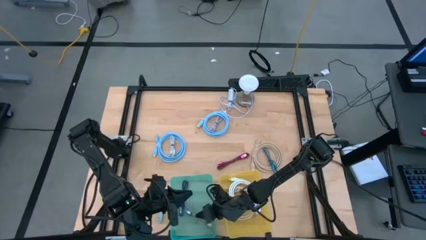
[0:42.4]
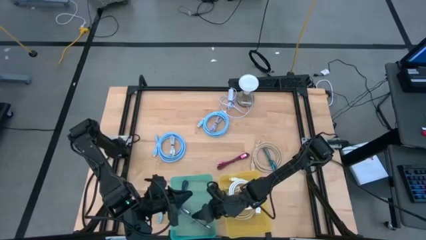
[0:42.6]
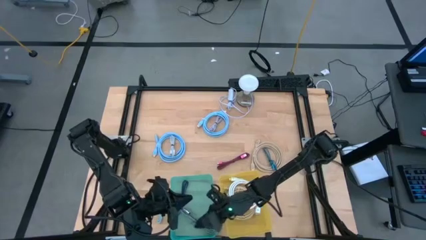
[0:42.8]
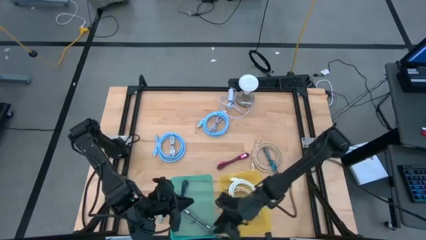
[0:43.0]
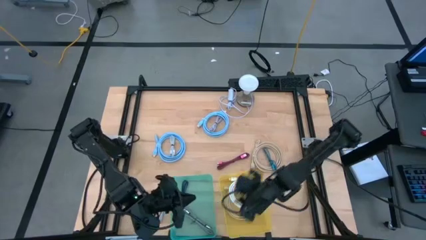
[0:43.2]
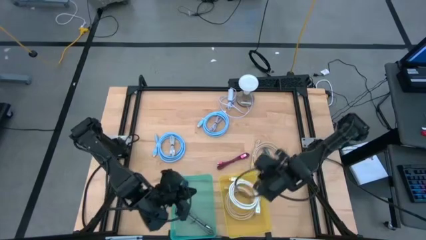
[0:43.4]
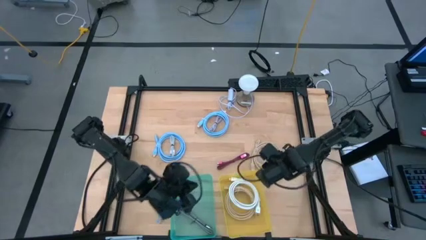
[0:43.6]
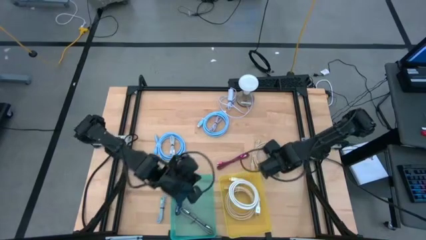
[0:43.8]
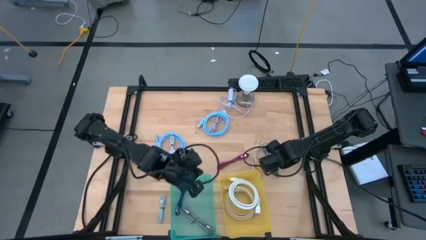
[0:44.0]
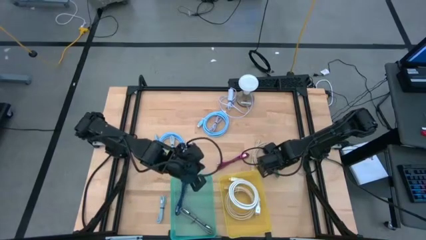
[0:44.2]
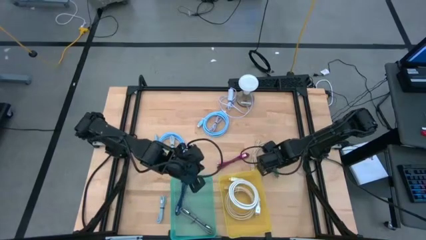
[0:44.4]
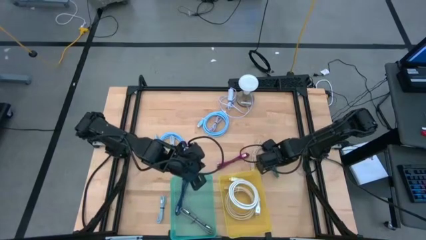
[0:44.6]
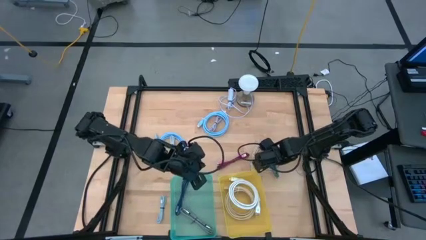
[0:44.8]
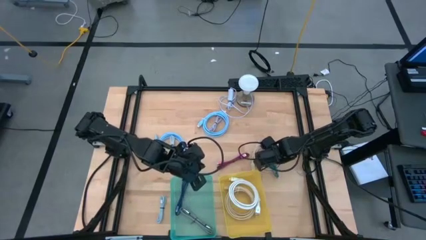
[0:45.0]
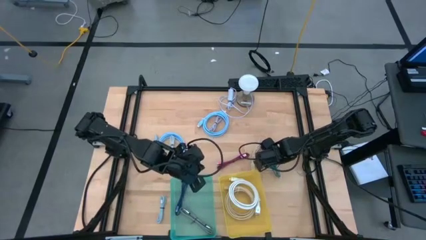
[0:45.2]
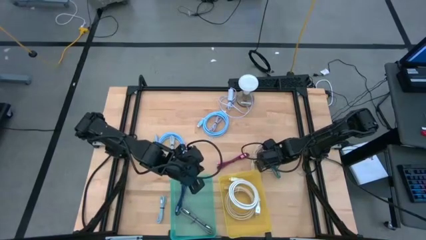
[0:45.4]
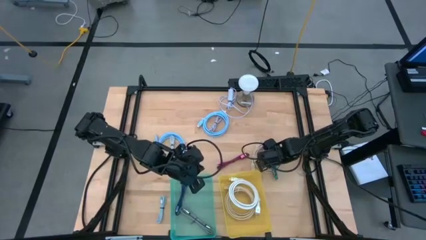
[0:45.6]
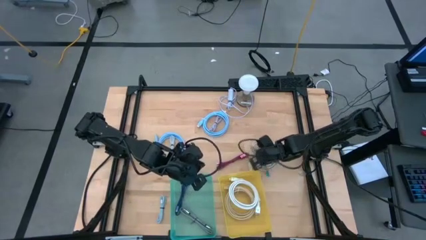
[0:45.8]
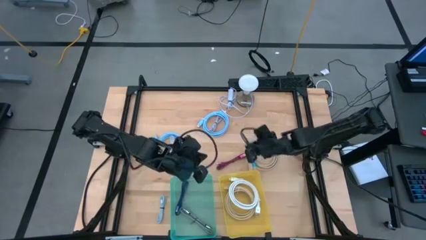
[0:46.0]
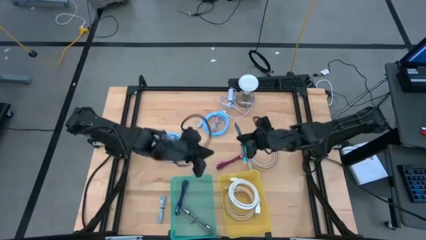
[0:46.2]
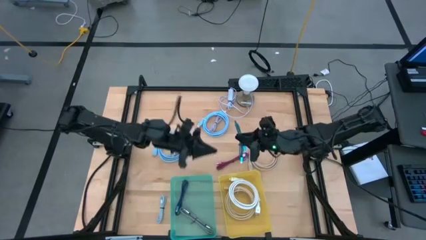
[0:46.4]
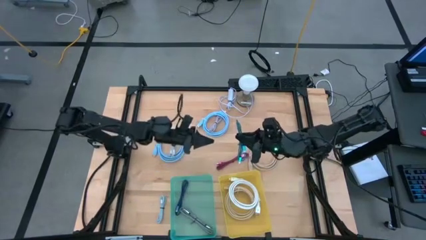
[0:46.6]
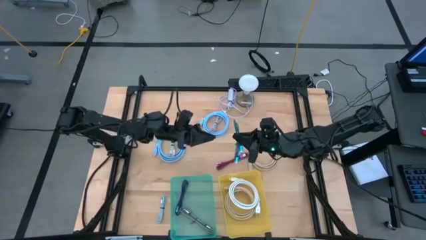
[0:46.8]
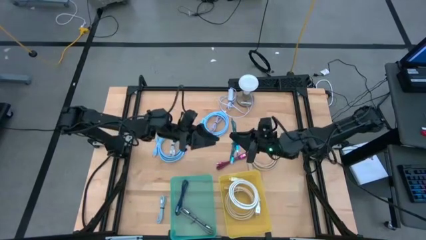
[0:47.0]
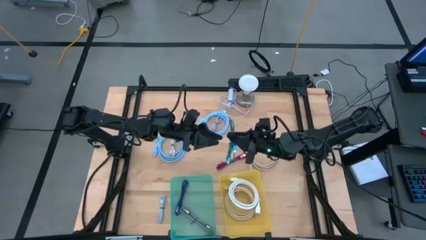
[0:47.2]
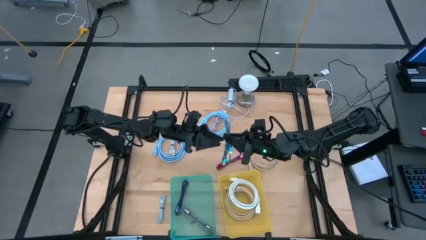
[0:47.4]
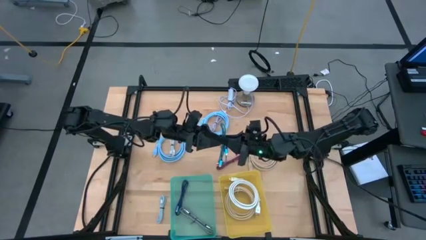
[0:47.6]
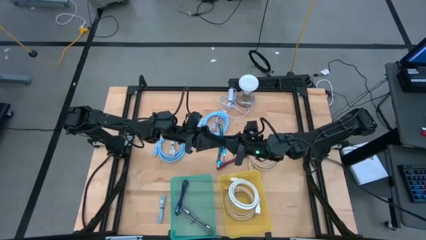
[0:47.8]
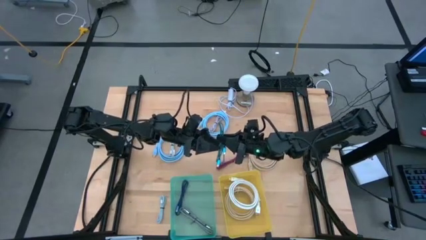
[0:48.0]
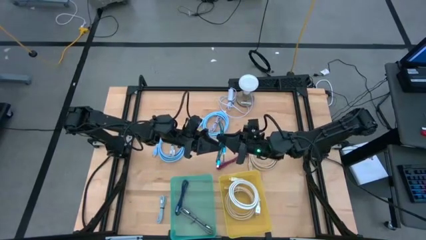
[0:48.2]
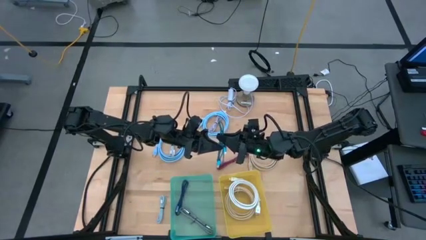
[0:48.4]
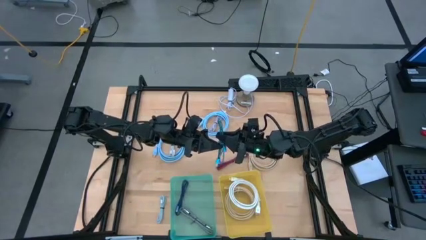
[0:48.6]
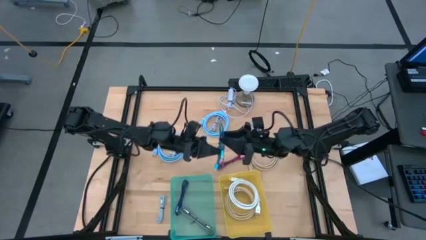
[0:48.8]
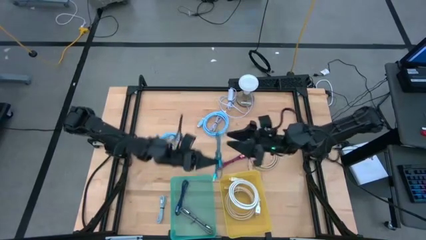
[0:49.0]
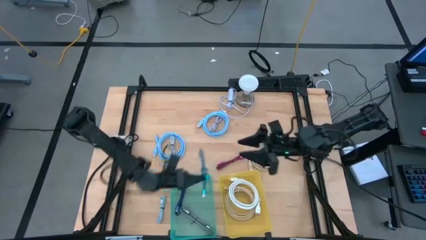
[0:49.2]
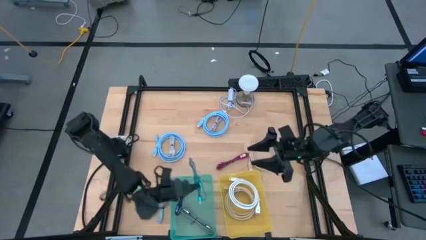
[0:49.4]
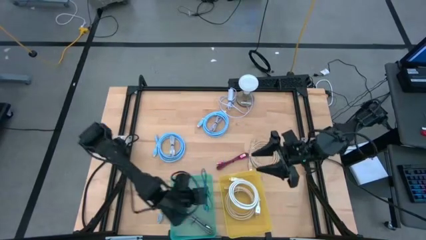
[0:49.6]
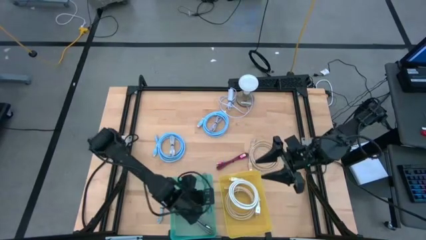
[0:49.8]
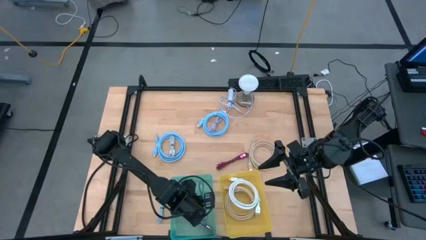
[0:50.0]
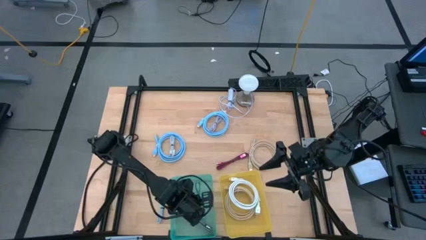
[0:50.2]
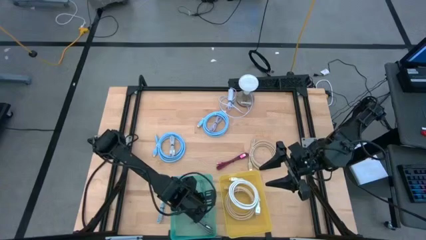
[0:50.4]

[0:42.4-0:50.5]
Task: Pick & Place USB Port
Put the green charger cable into the green bin

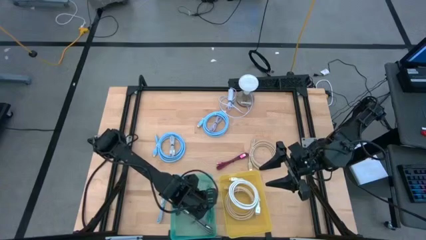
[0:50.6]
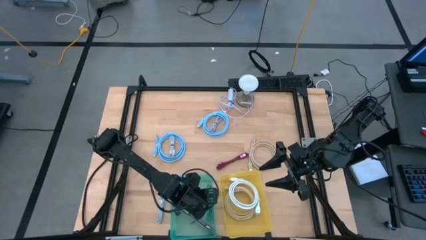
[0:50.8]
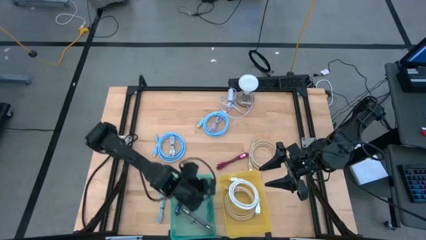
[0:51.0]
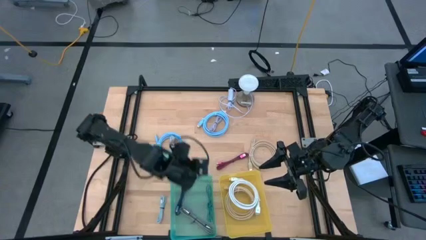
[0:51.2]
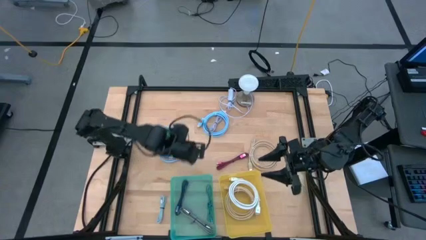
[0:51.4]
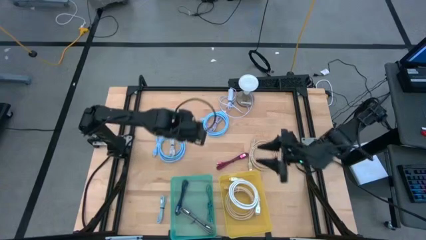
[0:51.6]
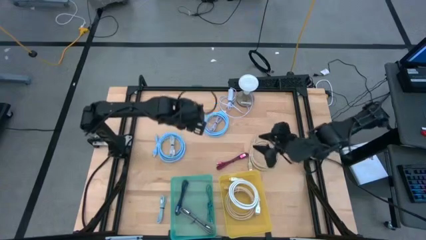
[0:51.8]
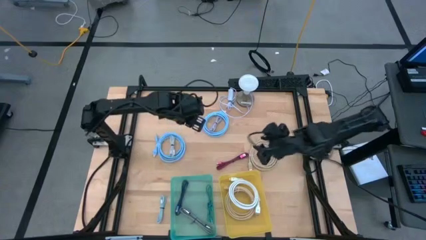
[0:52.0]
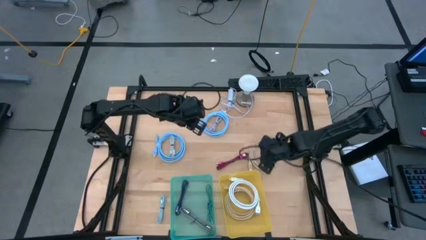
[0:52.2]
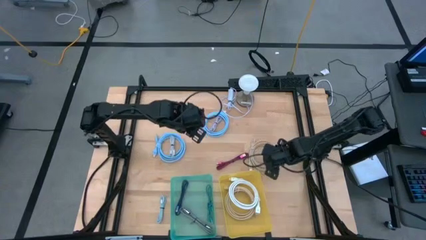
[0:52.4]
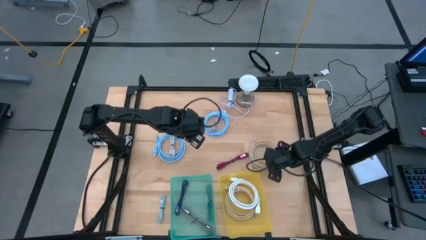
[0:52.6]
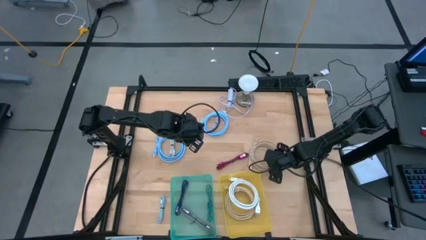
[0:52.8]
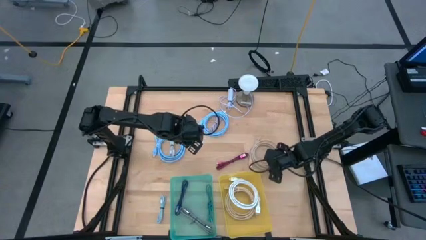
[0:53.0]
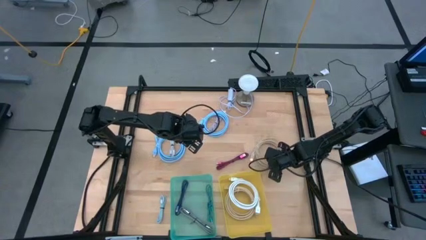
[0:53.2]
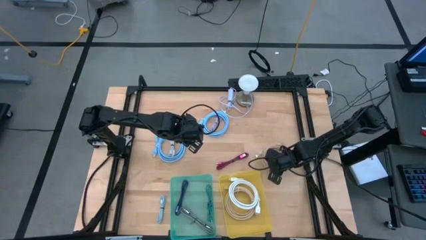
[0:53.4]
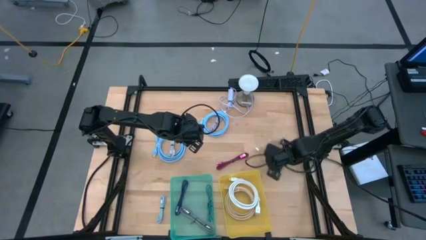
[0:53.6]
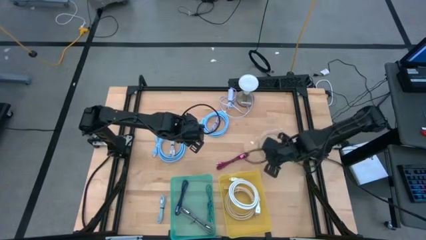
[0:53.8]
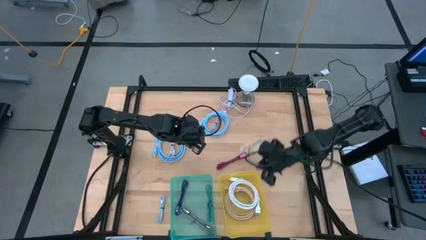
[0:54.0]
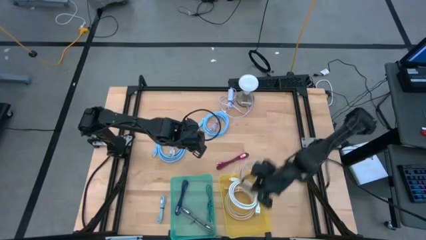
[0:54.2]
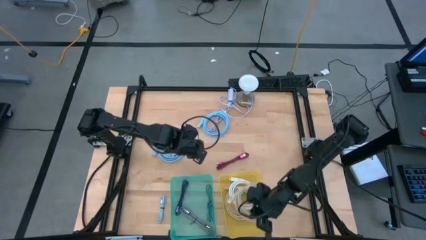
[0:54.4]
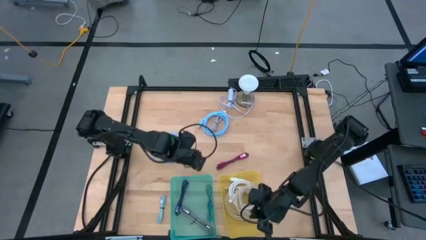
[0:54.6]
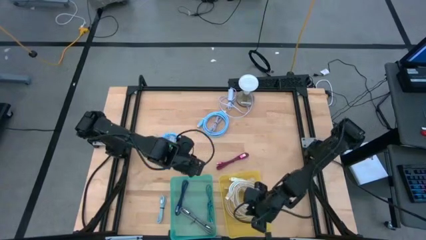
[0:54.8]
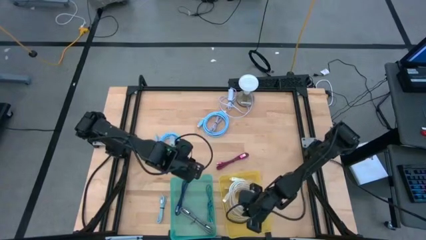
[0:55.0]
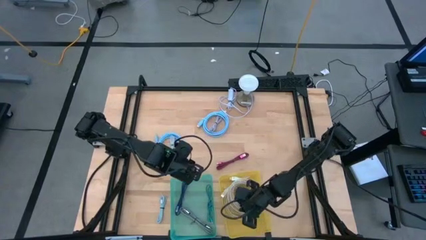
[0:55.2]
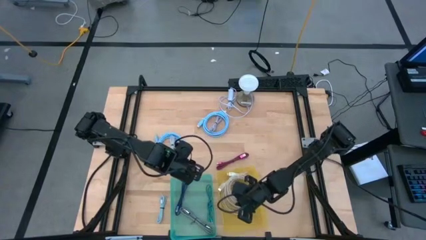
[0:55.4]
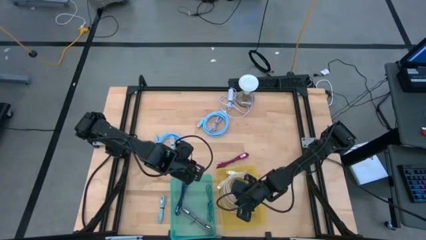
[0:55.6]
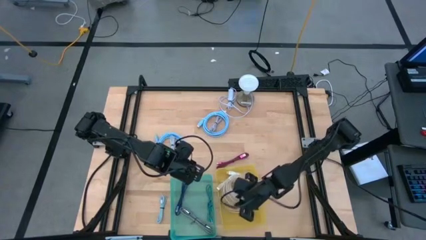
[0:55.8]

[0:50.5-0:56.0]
Put the brown hdmi cable into the yellow bin

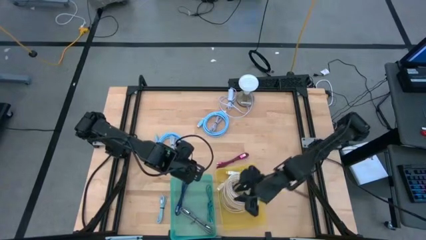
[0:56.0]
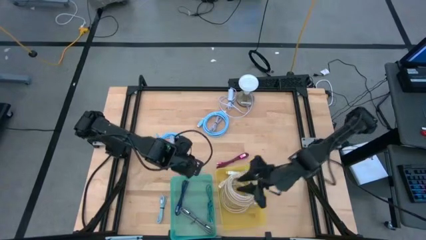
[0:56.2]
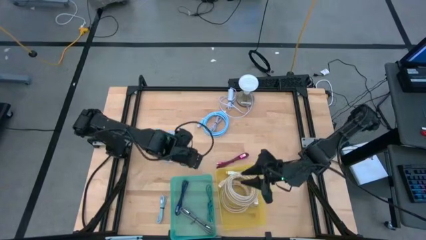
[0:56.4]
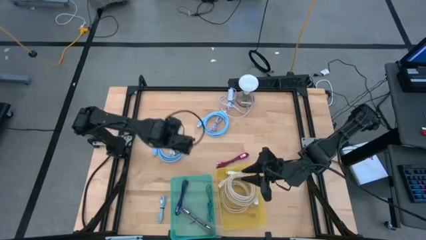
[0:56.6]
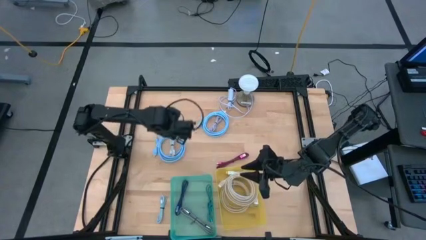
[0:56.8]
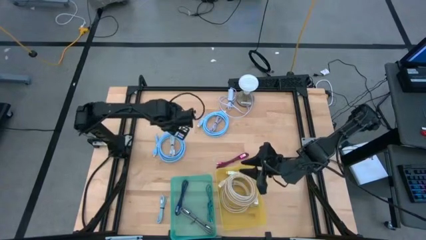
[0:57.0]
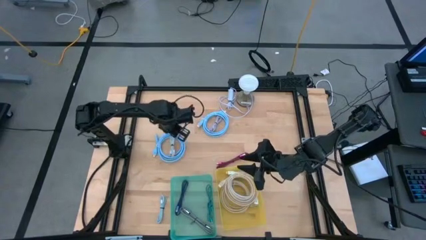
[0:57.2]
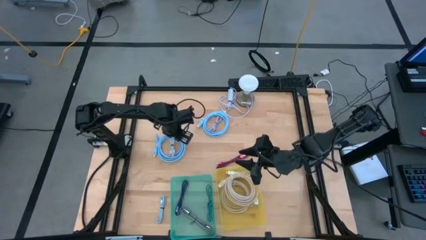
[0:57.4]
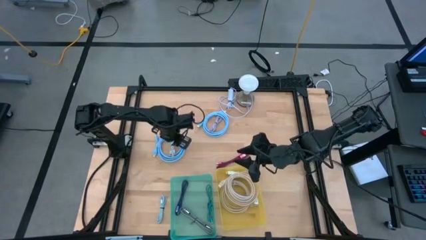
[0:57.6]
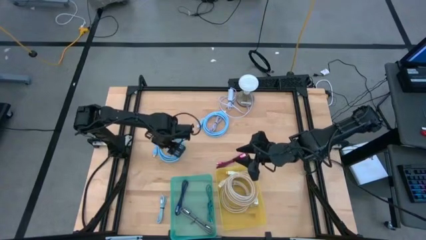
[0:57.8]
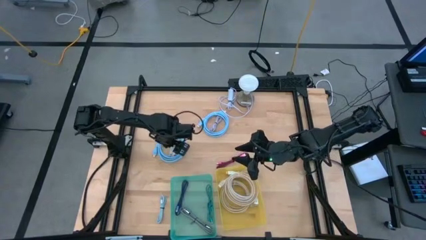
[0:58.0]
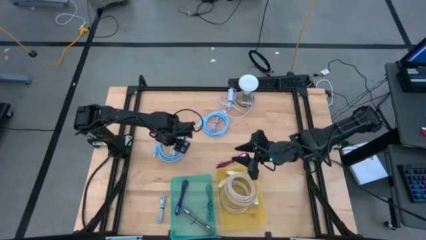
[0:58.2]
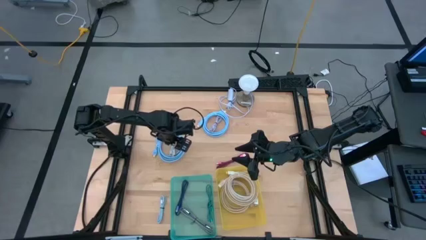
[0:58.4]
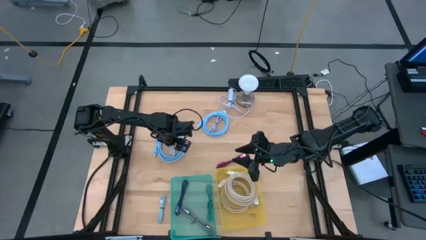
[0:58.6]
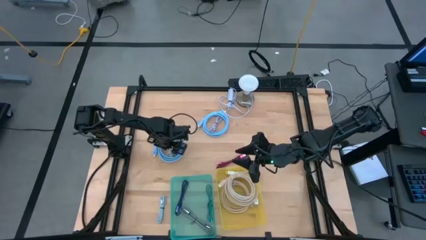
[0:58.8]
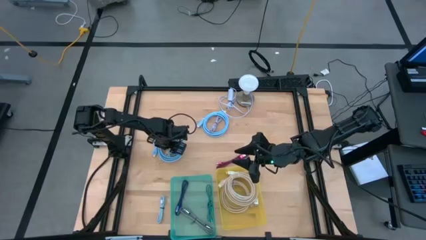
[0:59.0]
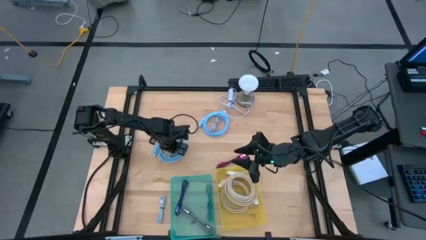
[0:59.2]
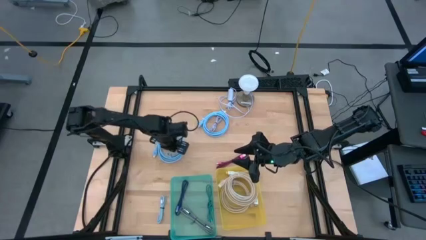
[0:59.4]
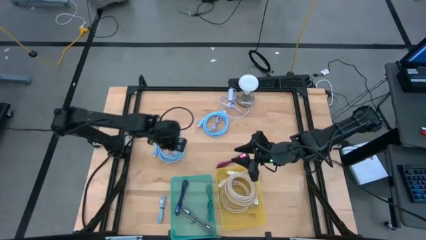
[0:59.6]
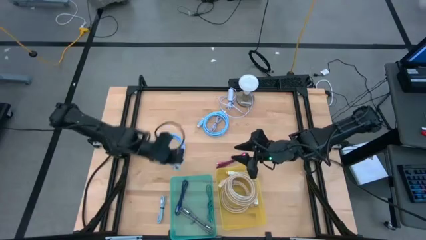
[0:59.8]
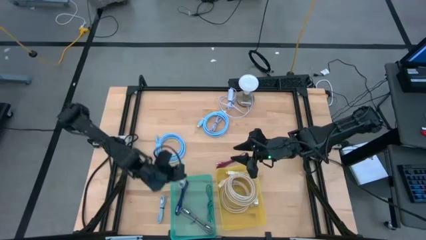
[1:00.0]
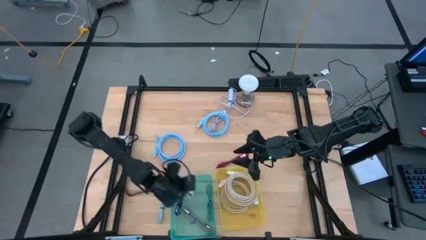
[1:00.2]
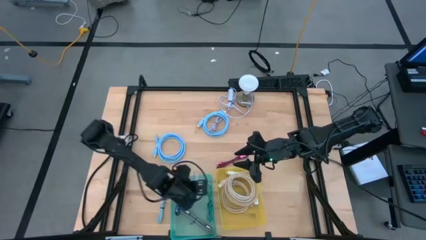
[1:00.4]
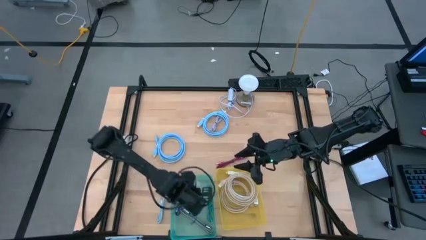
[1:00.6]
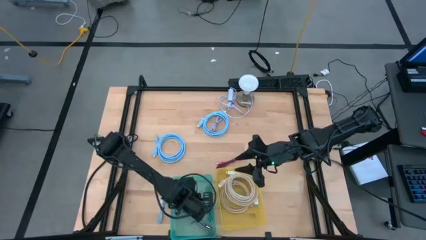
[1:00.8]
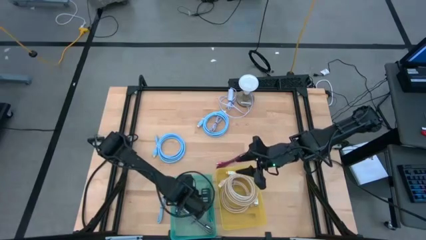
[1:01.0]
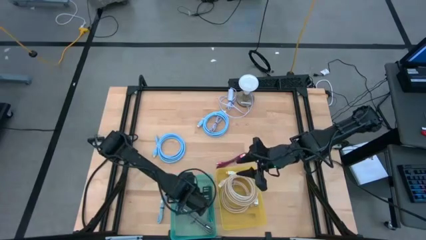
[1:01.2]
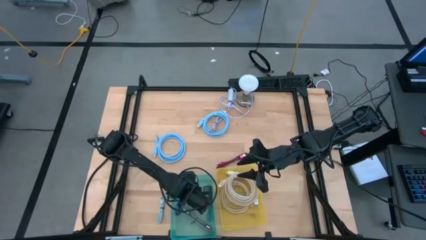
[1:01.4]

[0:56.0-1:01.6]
Put the white charger cable into the green bin
